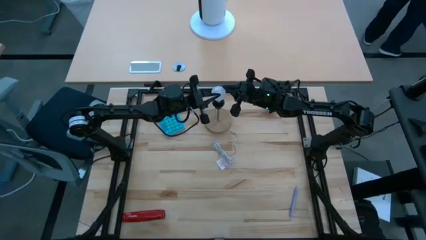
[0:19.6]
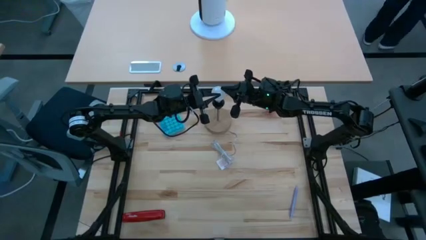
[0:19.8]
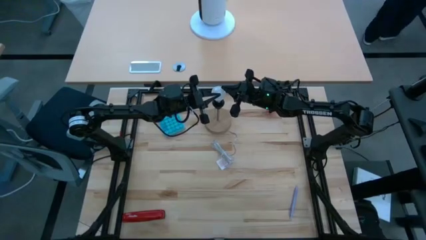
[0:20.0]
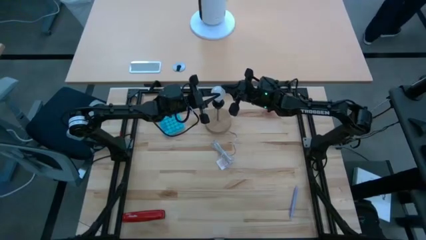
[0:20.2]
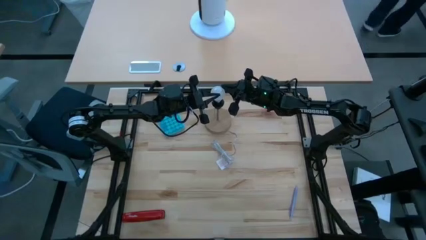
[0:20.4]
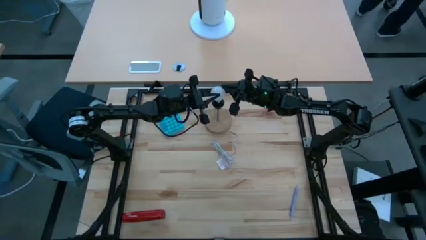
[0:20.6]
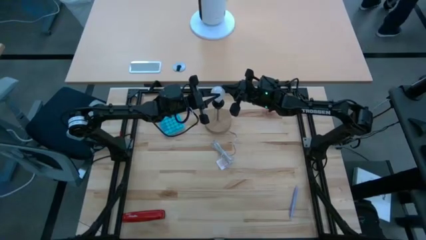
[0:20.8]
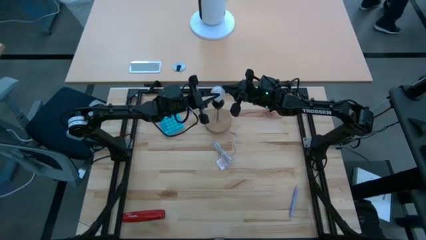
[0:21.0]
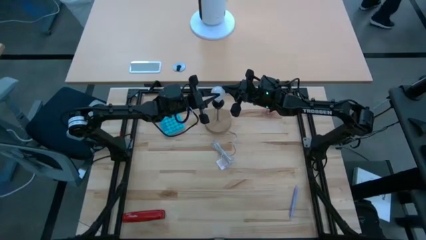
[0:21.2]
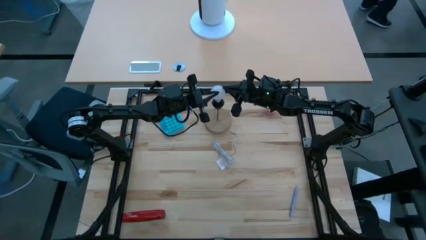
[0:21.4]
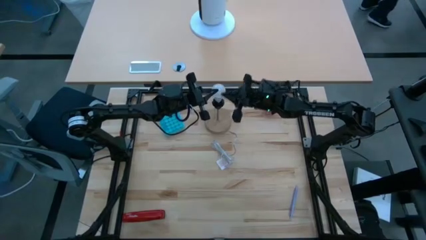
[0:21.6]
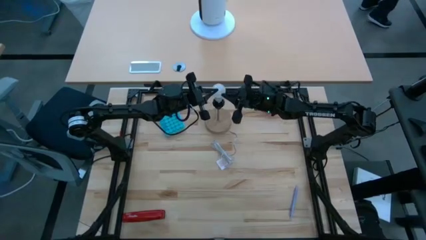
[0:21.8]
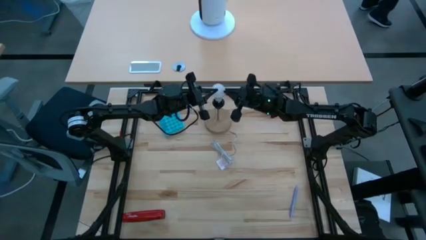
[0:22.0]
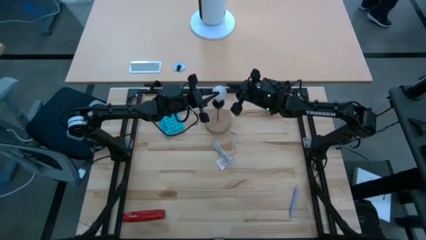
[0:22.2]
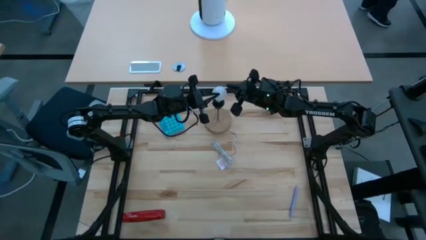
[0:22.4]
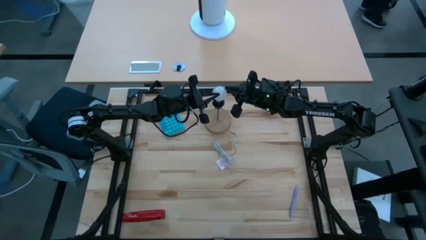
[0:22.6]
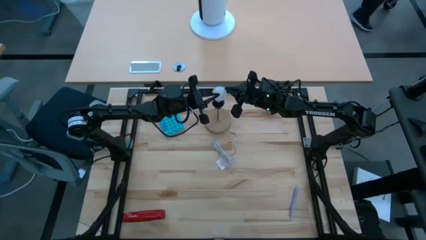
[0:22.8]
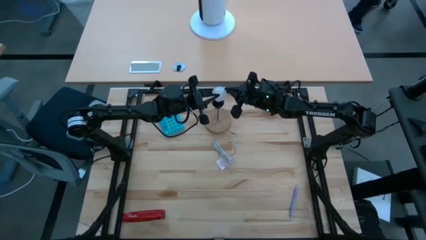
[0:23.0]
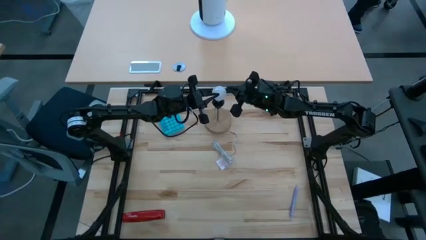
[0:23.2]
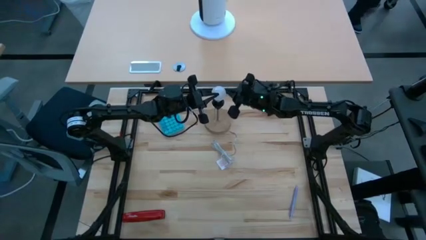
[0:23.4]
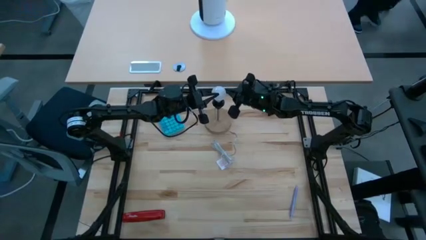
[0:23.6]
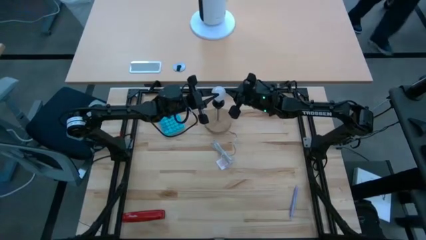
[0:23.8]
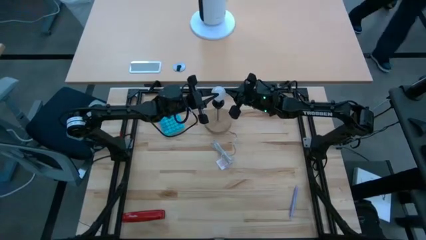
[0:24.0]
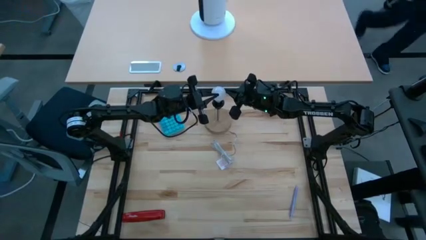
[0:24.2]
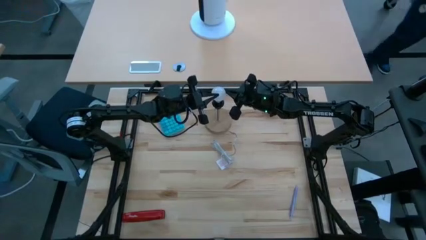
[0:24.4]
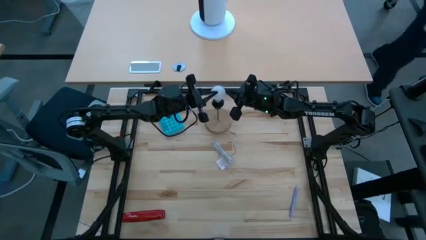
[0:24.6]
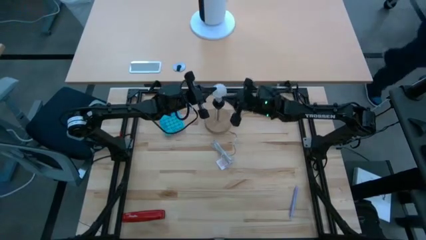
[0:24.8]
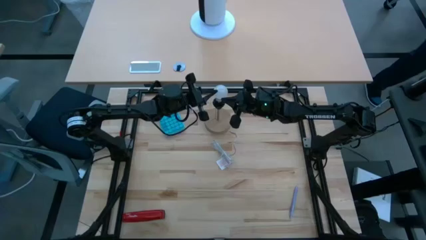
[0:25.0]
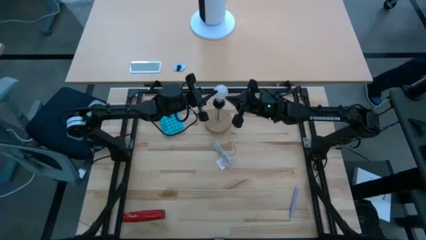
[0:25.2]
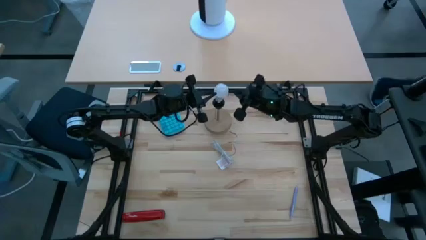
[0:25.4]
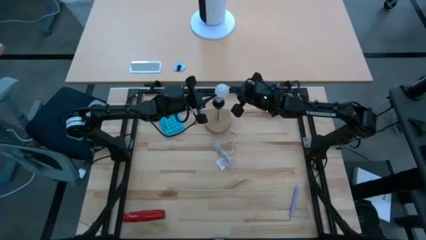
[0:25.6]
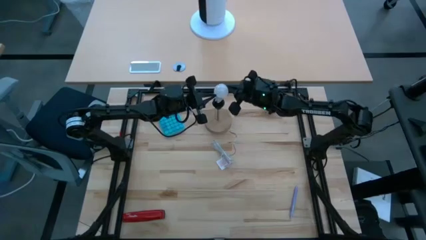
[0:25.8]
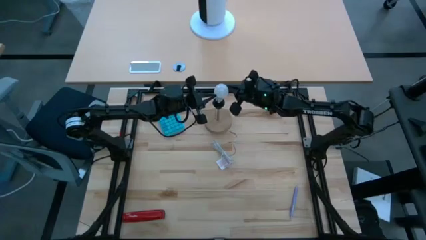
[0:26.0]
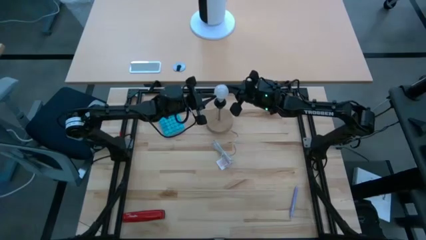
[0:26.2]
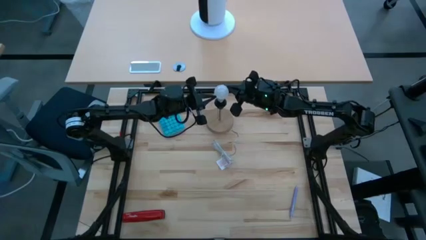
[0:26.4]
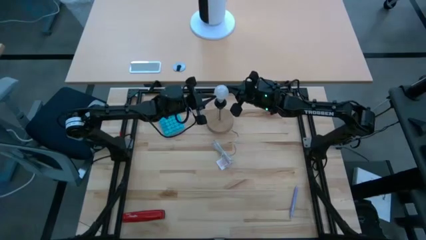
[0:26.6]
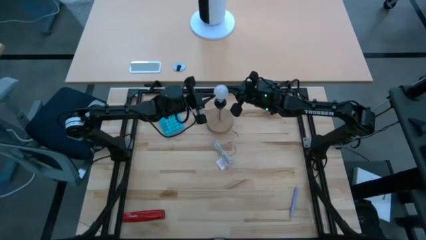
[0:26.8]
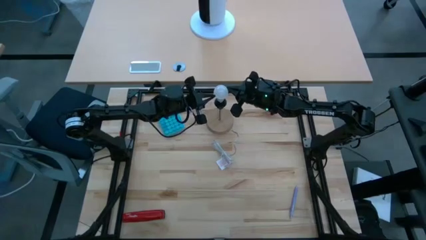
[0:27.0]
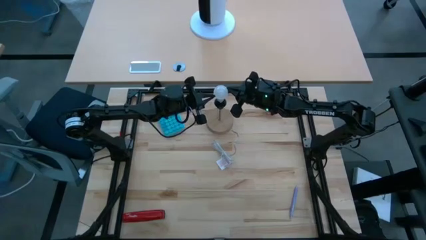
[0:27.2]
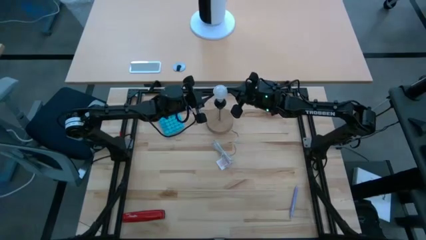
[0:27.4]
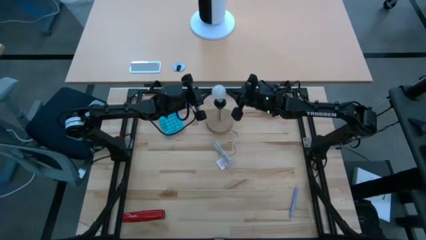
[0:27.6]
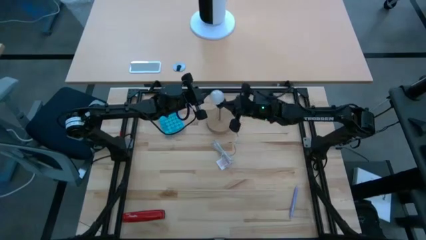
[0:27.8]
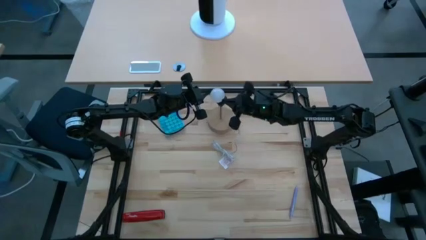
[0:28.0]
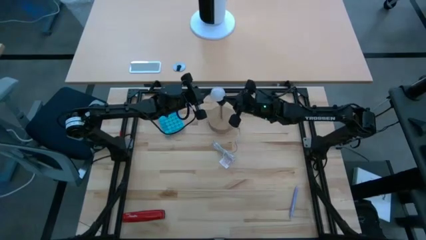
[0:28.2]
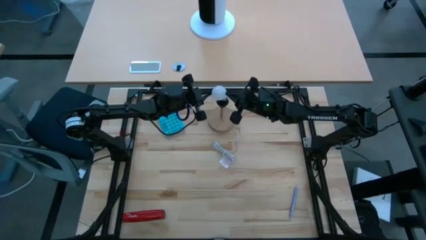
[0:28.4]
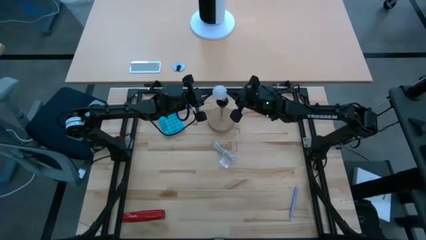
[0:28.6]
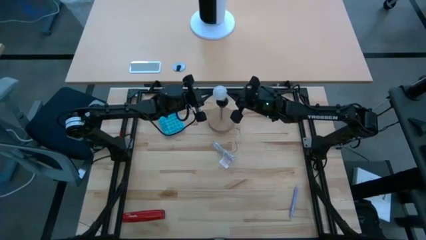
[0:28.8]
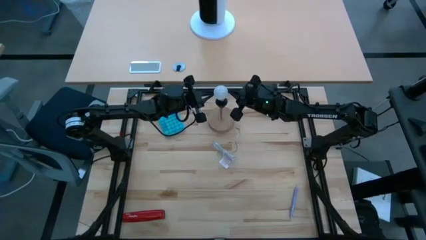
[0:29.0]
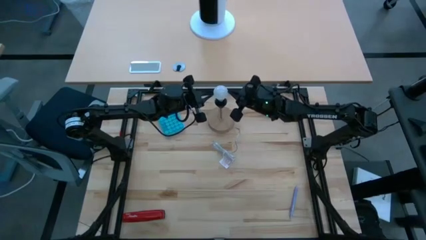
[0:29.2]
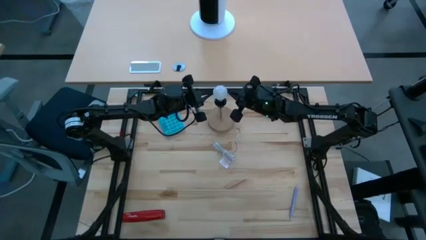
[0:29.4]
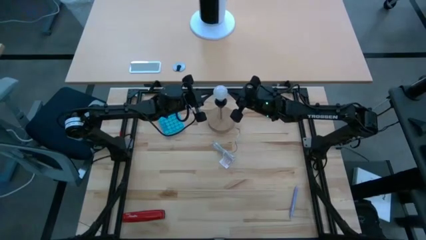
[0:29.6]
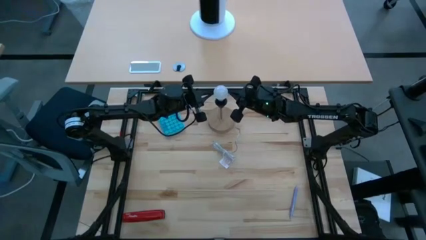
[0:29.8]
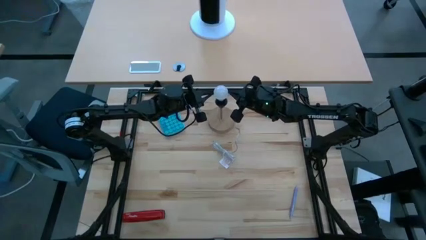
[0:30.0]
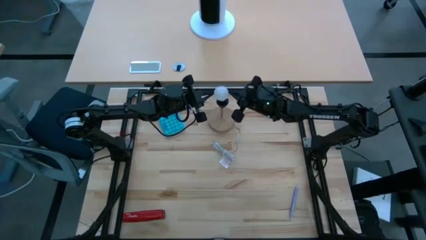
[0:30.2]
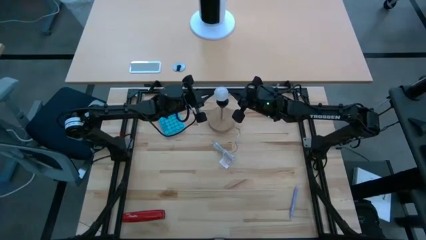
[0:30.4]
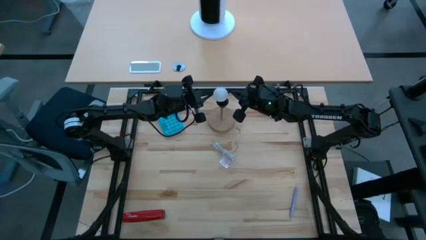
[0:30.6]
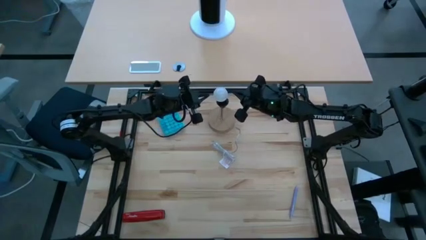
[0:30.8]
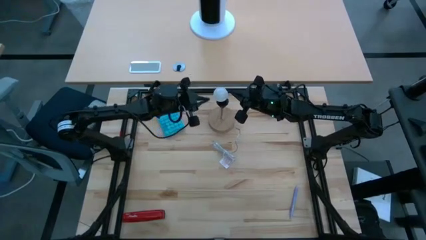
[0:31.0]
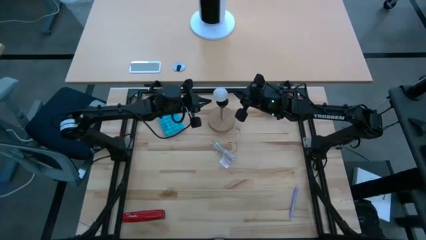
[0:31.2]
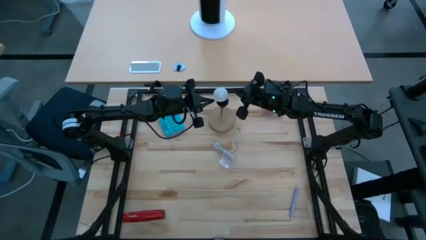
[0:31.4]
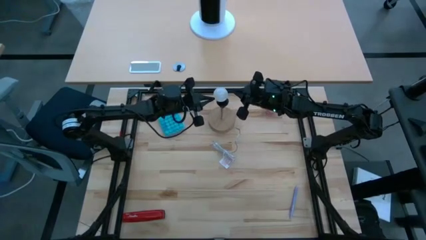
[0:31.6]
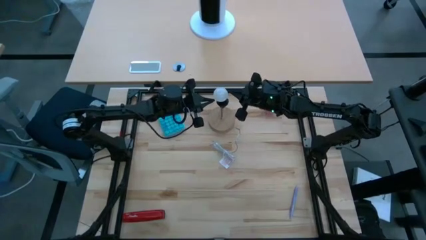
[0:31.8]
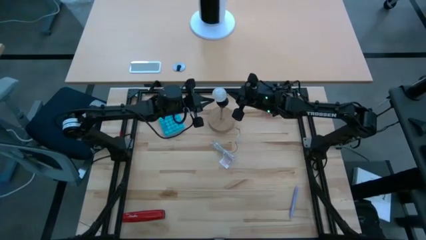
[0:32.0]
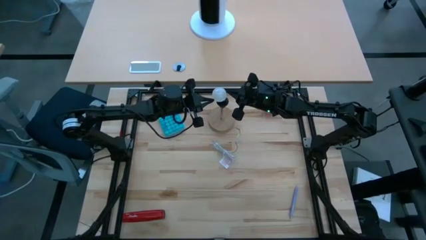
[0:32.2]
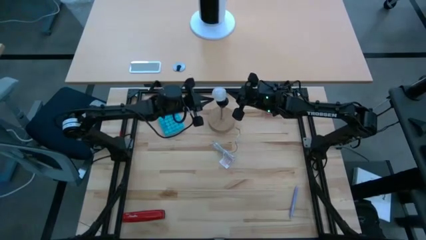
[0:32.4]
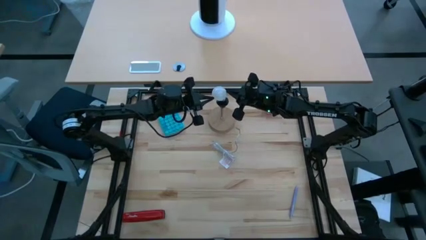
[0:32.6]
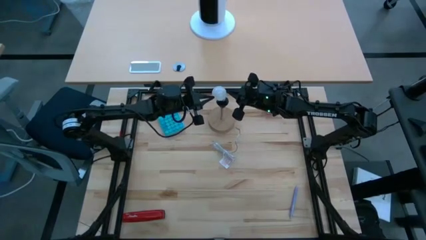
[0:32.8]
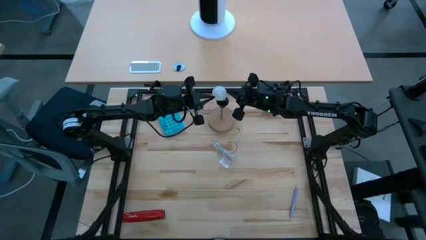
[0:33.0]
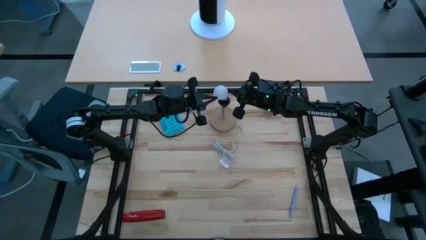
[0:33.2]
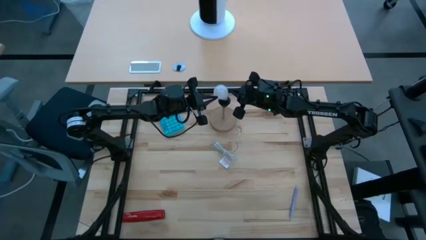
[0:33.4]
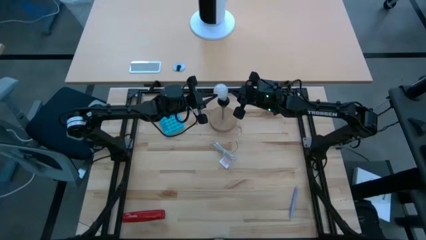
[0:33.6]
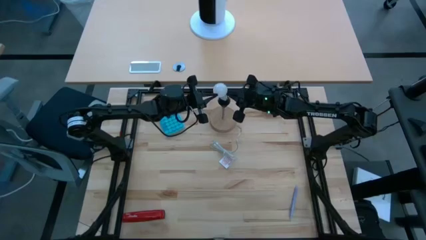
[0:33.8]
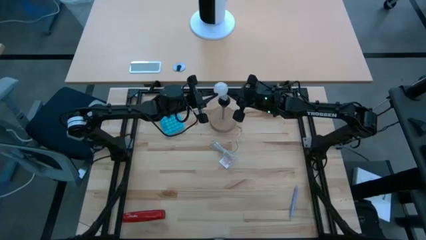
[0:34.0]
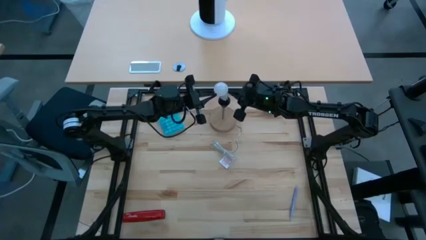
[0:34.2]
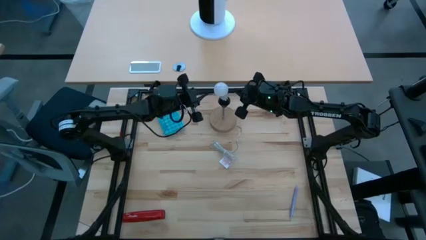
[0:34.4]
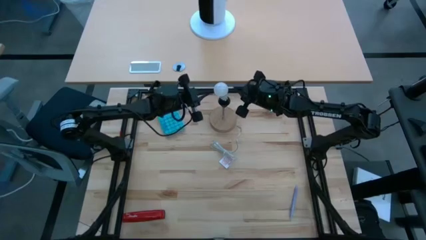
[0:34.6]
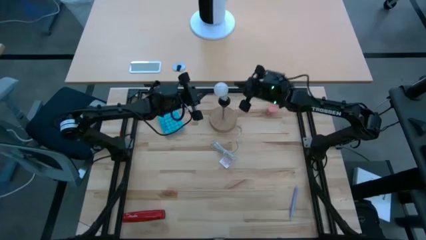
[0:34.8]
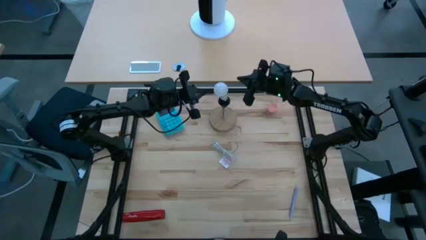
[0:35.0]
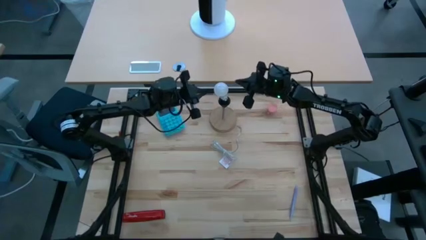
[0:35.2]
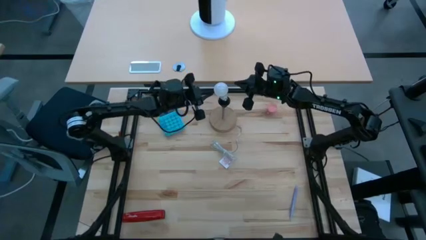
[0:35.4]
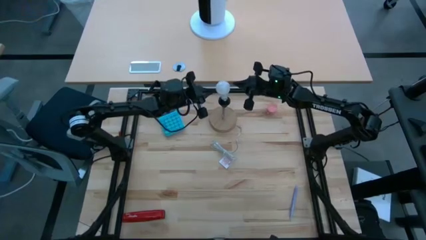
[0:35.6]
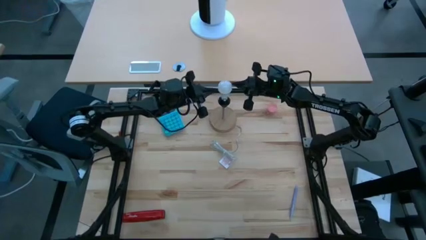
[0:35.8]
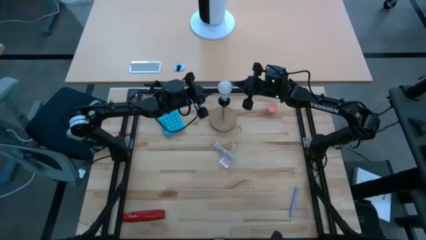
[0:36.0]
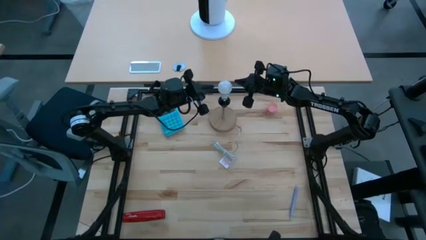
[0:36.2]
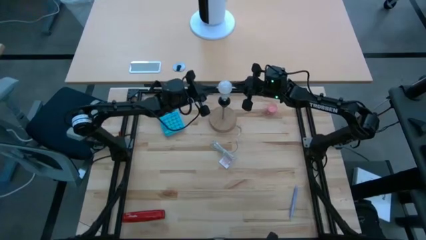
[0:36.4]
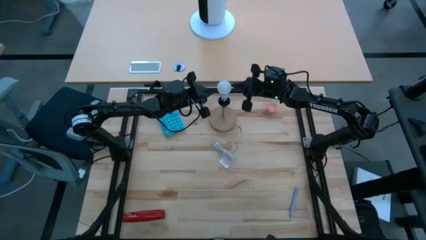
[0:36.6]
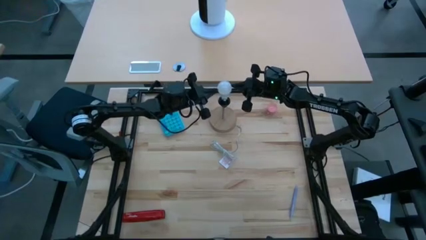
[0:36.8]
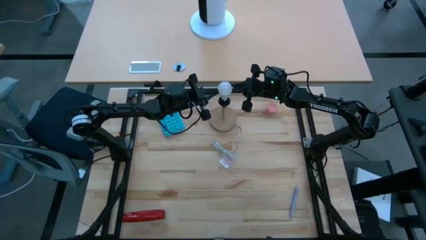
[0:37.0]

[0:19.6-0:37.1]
Task: Screw lightbulb
Insert the light bulb into the desk lamp
